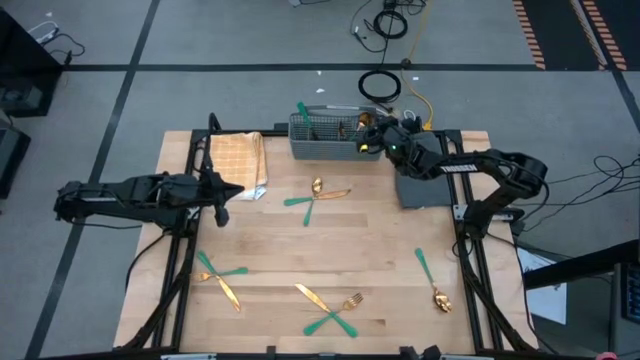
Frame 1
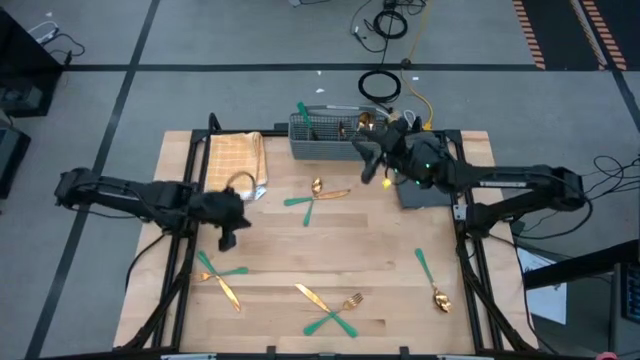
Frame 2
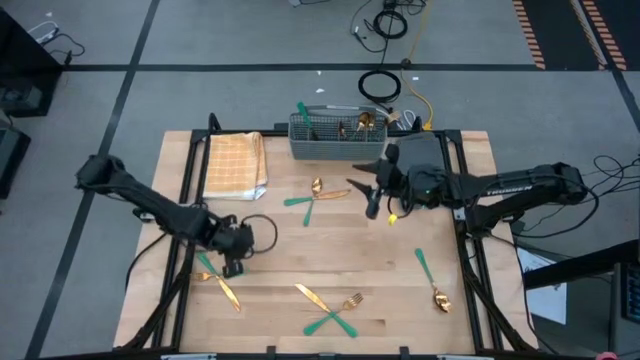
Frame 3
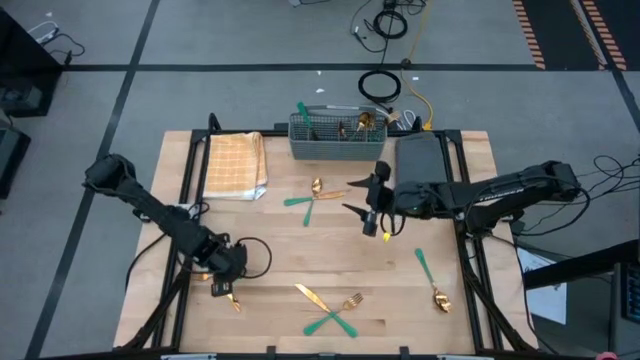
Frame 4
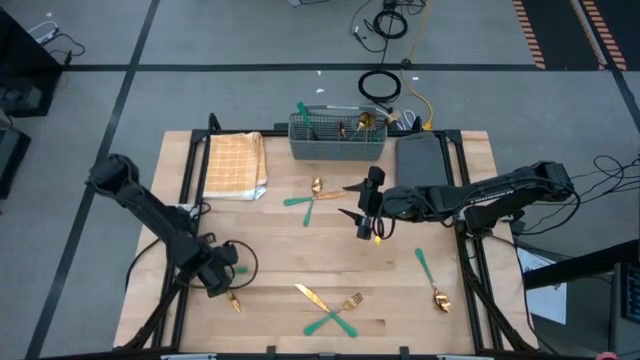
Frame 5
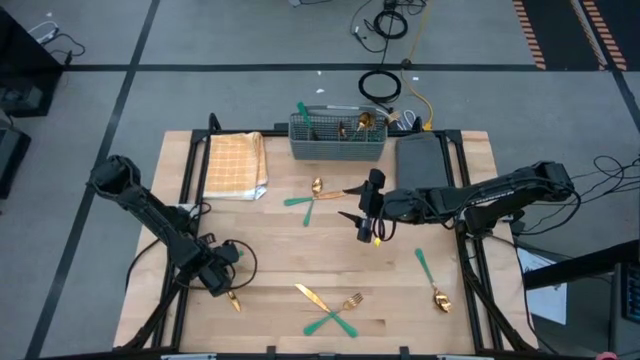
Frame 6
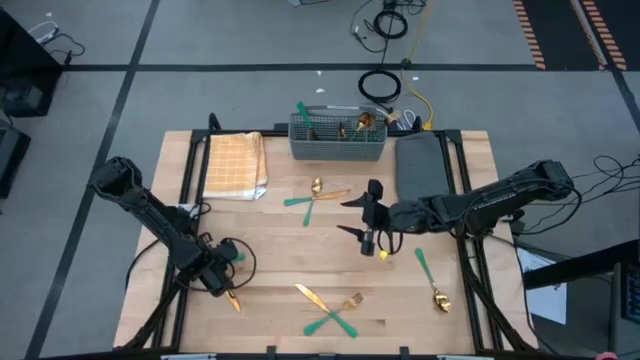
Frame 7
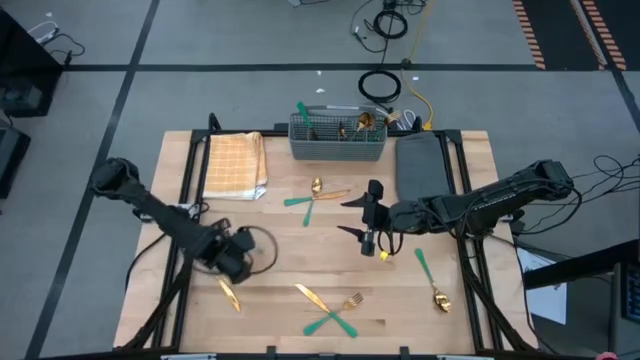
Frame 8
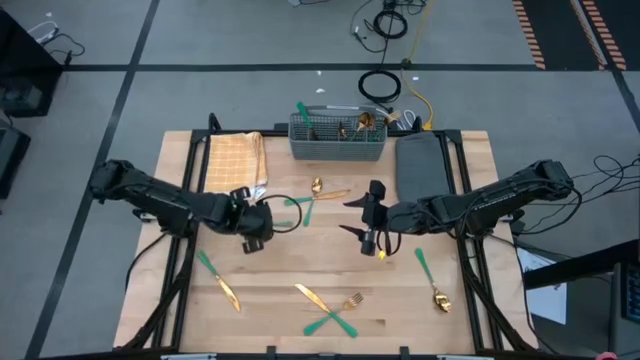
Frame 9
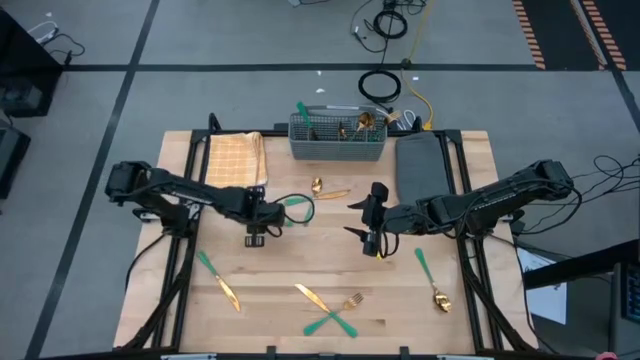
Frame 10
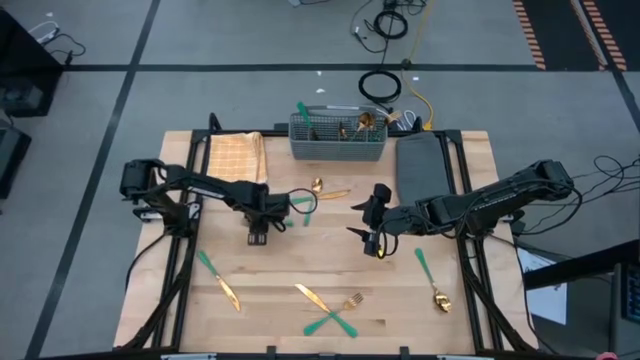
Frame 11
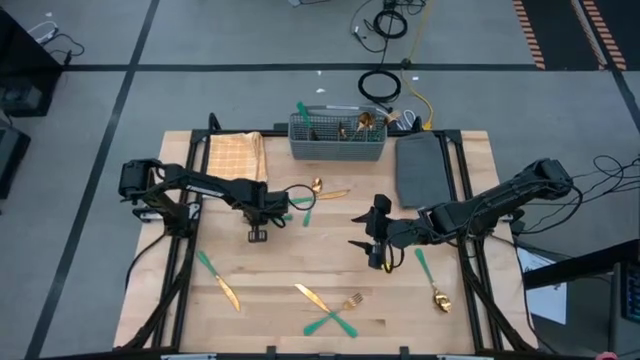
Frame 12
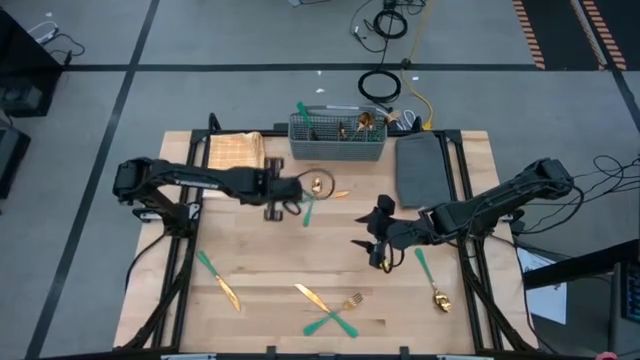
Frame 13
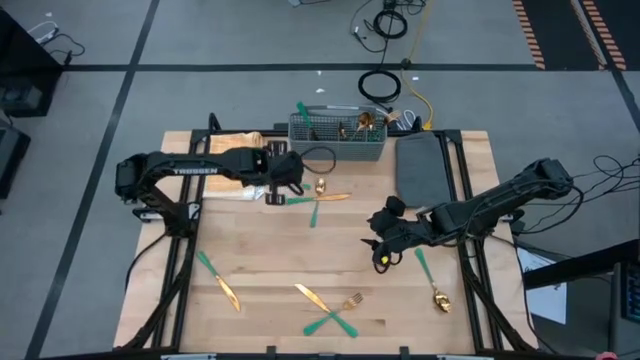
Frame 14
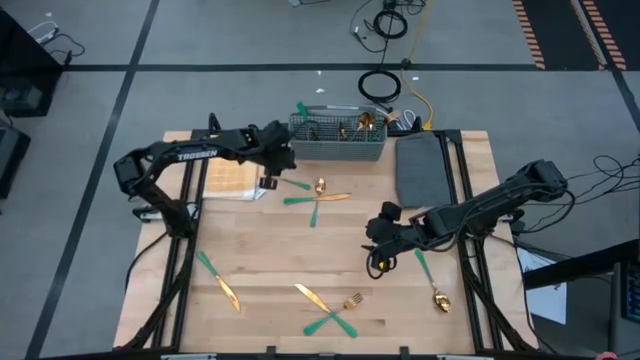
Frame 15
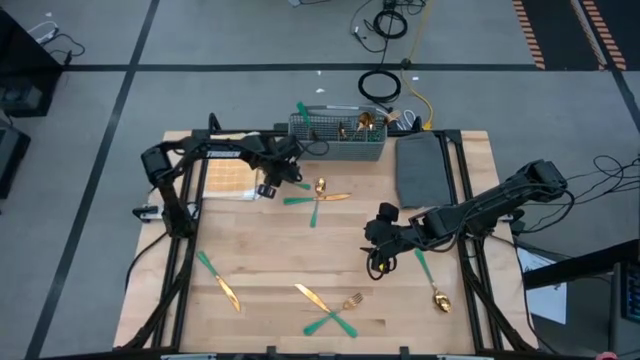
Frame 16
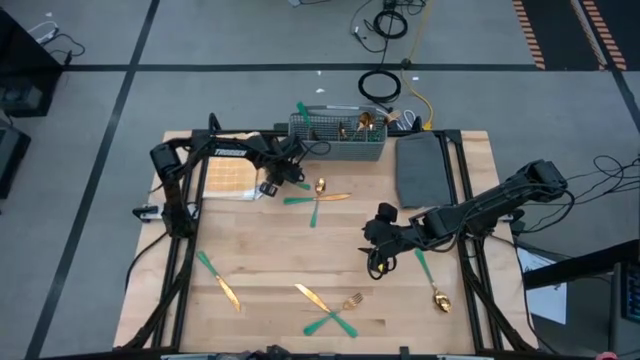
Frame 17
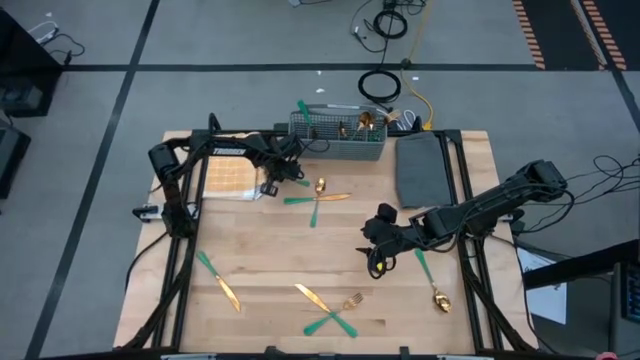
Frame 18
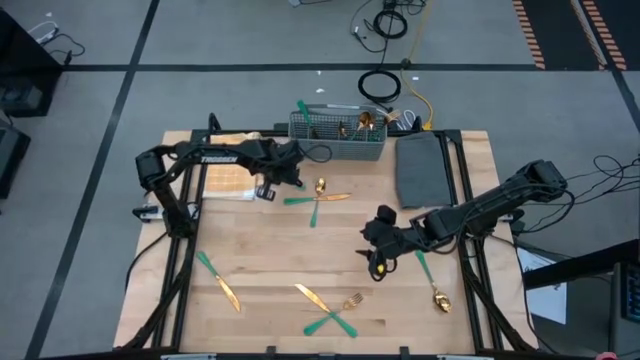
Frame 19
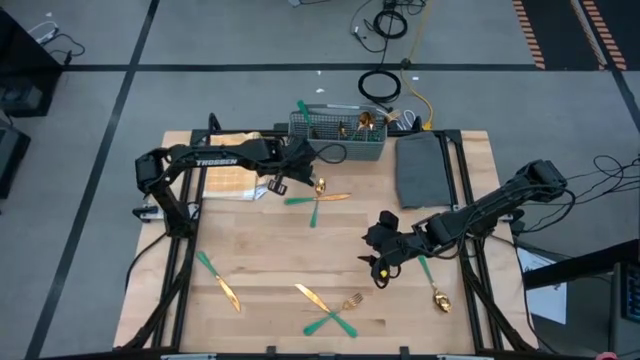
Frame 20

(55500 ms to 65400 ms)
Task: Sort silverware
Put the fork into the right section of the dish rack

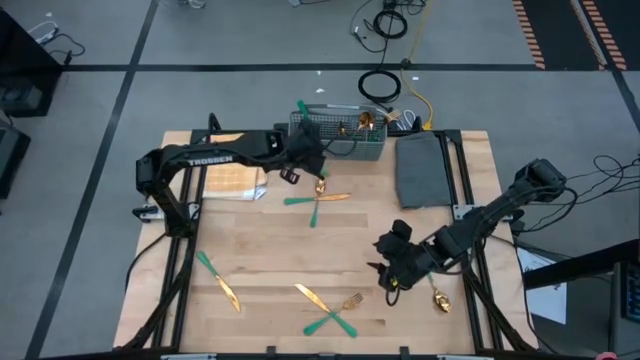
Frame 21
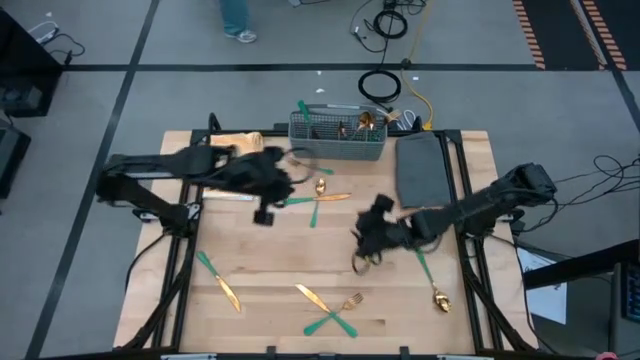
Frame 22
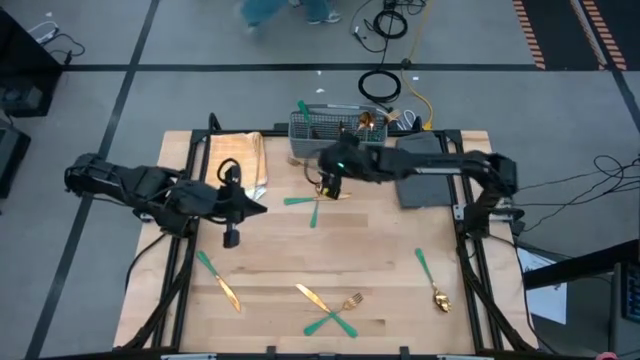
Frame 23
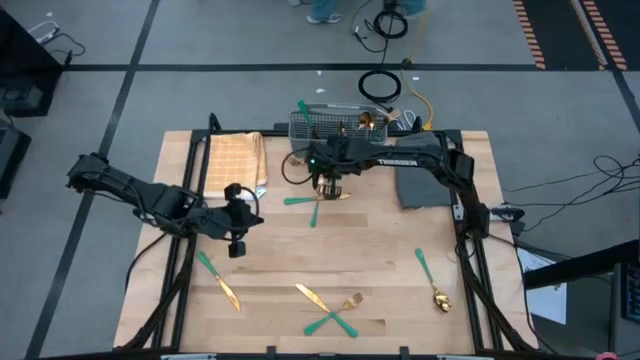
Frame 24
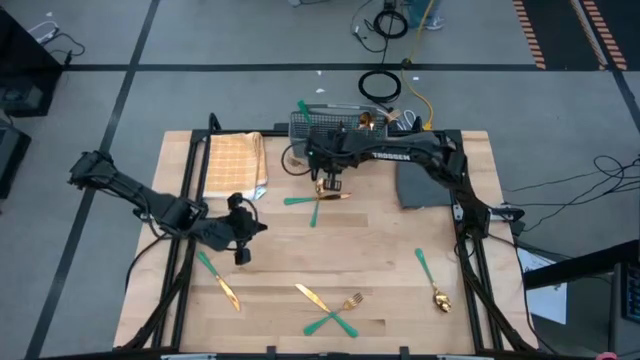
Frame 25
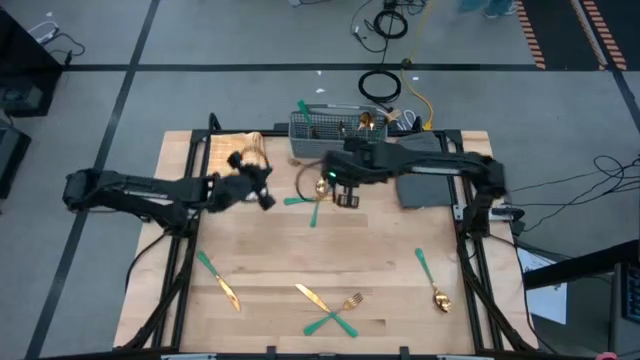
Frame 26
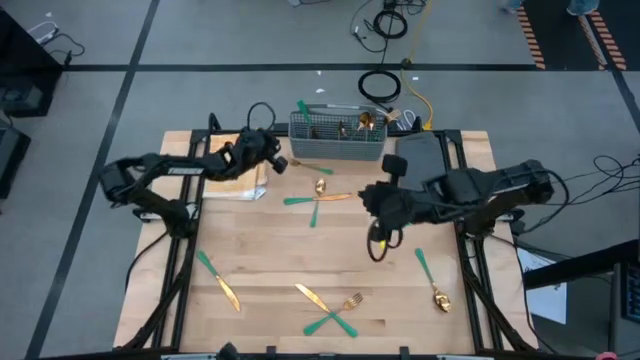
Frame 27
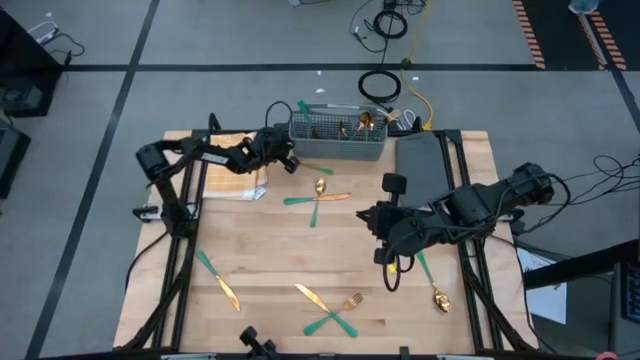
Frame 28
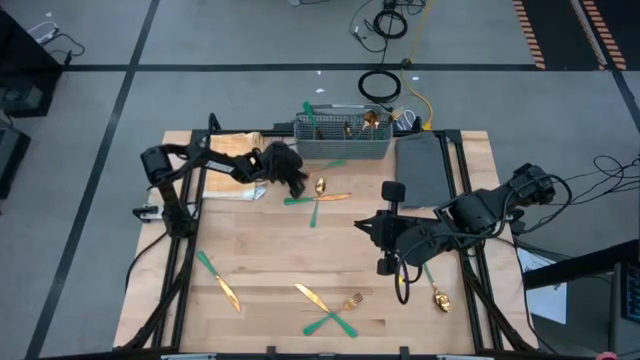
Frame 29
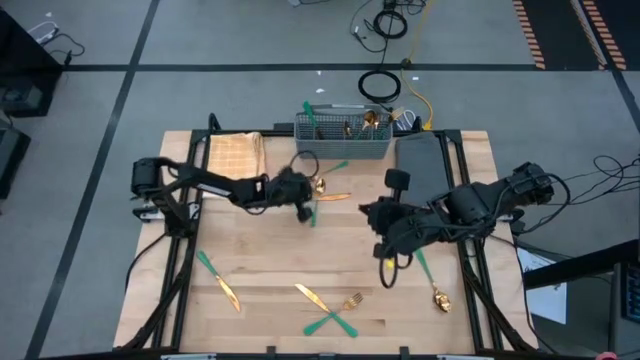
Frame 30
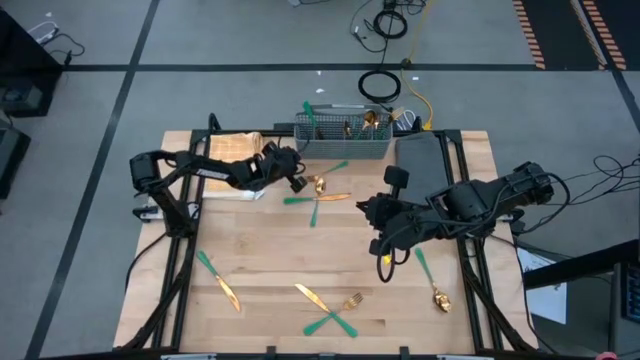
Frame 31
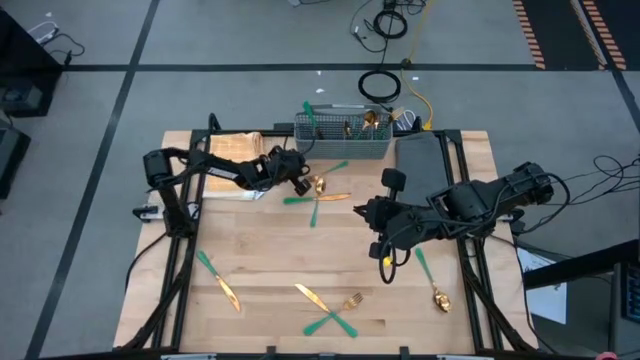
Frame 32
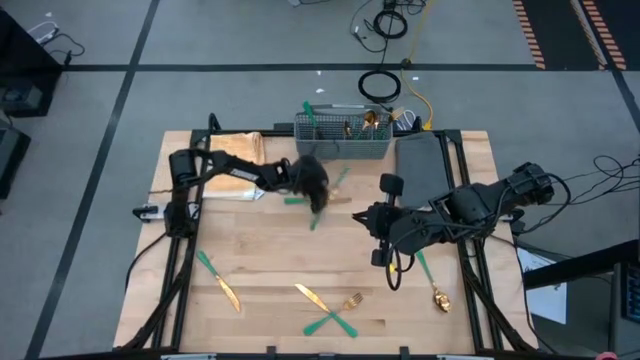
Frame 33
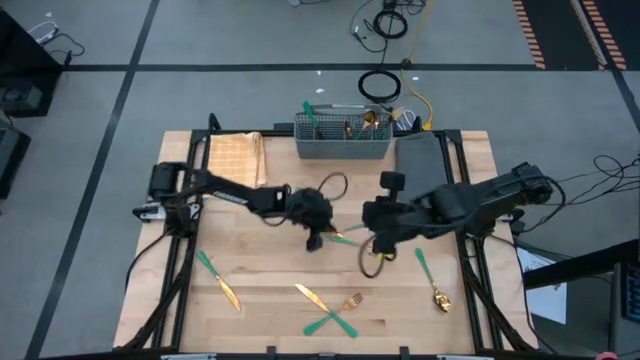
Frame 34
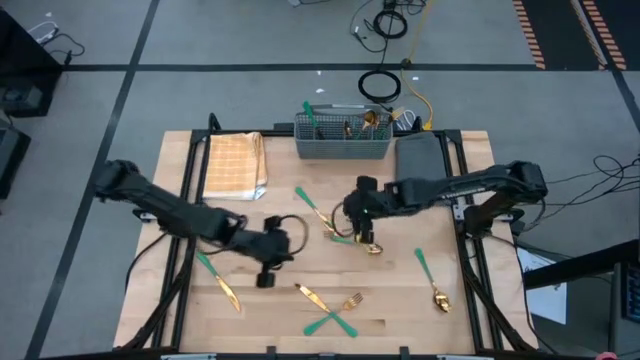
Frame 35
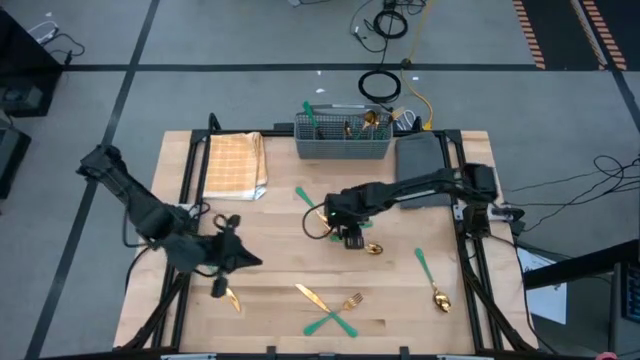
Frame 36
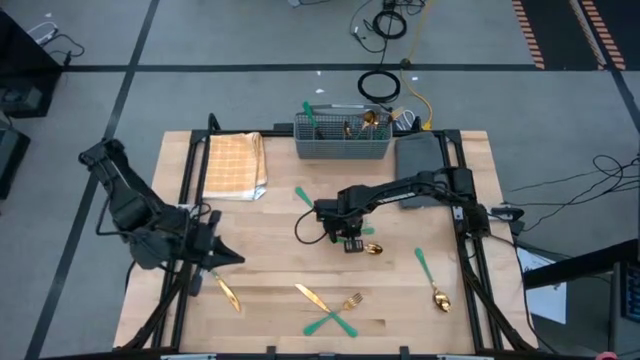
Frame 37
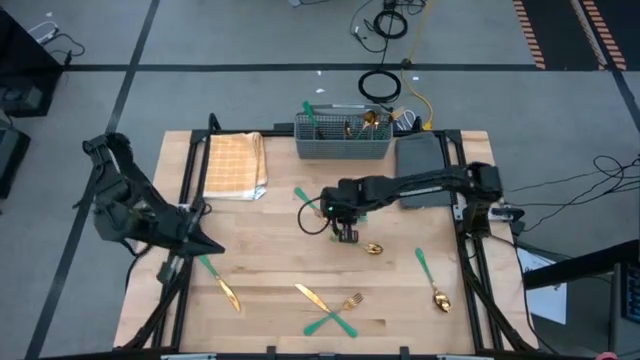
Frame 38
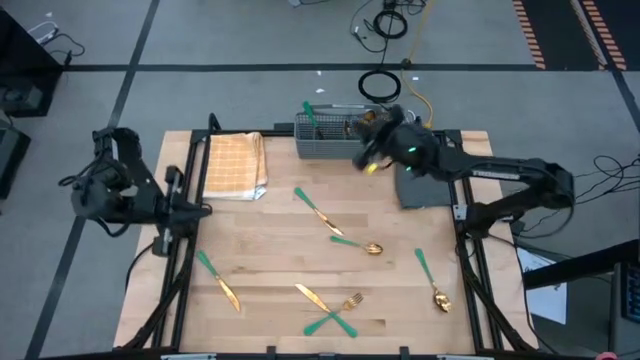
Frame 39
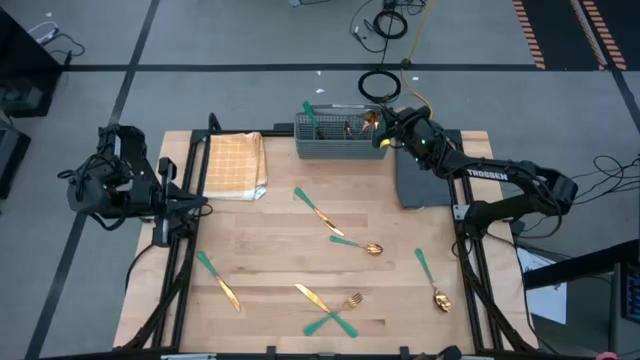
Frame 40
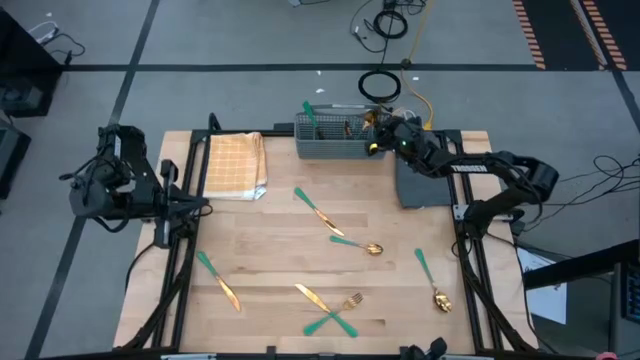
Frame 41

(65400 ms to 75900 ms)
Put the fork into the right section of the dish rack
